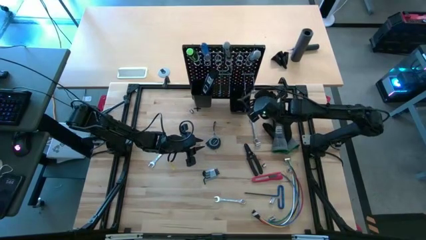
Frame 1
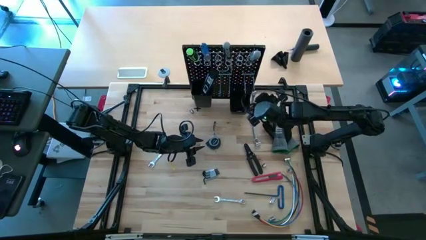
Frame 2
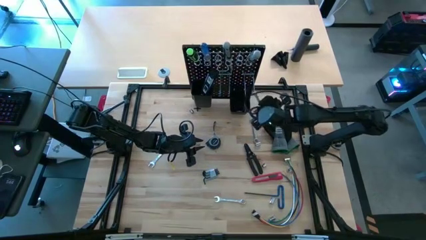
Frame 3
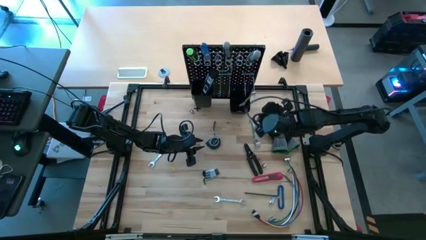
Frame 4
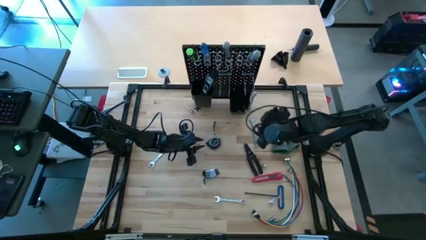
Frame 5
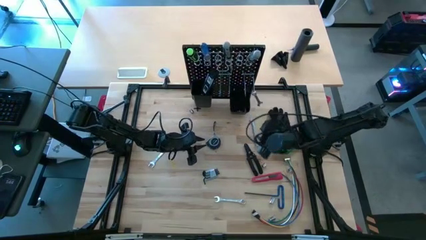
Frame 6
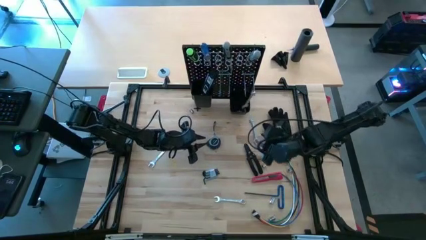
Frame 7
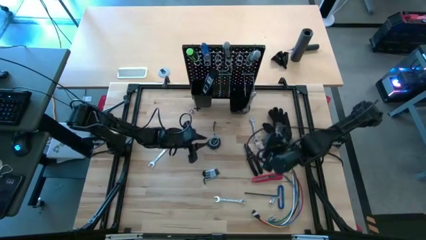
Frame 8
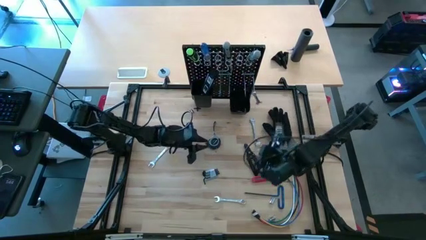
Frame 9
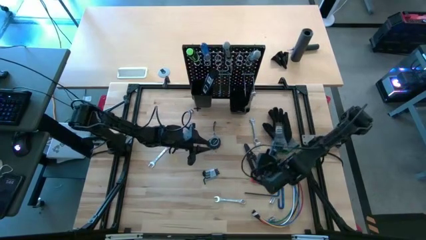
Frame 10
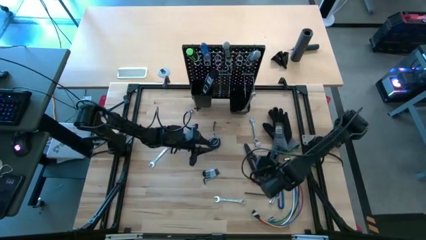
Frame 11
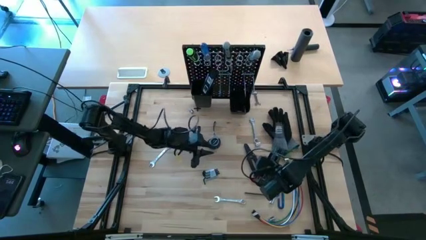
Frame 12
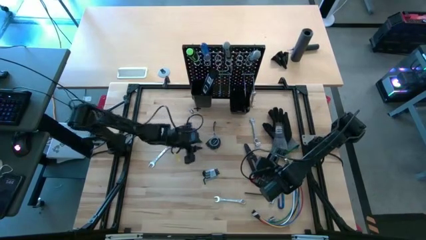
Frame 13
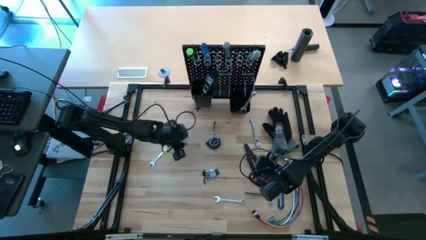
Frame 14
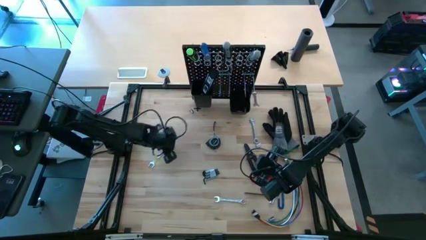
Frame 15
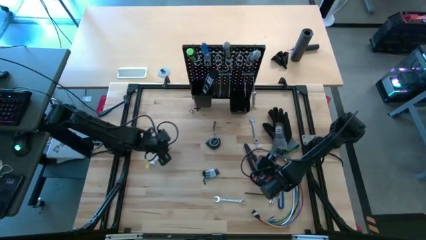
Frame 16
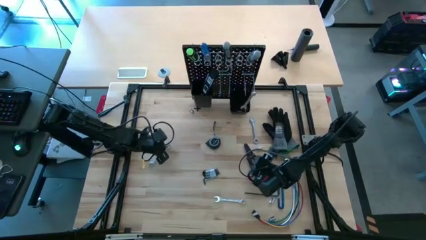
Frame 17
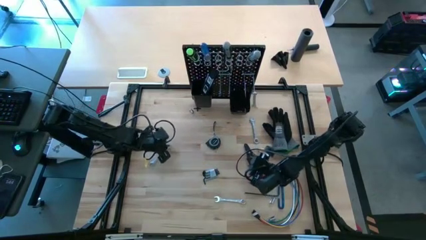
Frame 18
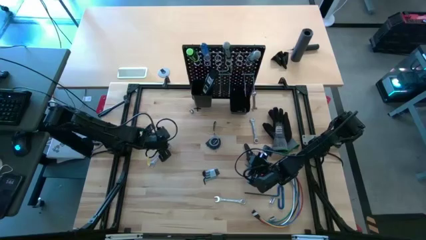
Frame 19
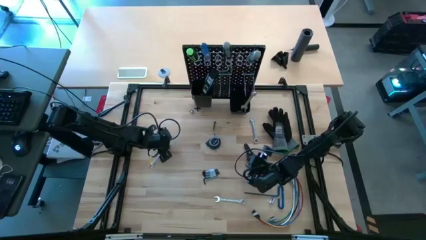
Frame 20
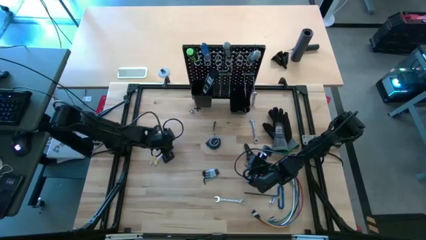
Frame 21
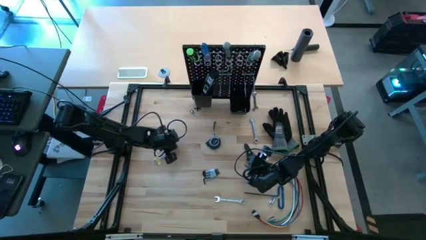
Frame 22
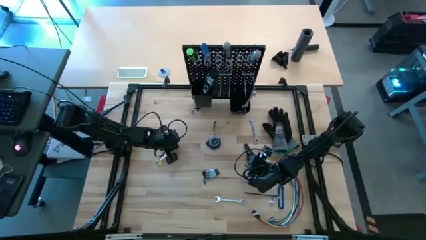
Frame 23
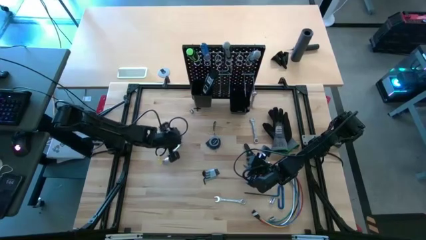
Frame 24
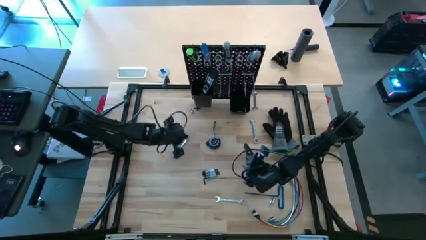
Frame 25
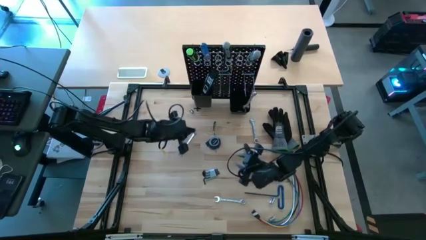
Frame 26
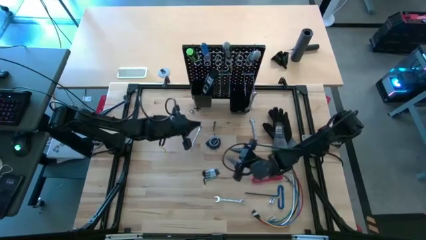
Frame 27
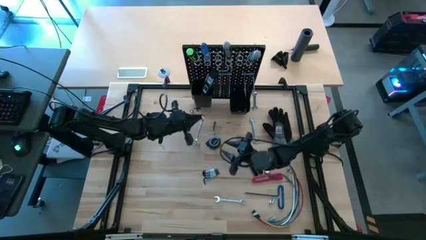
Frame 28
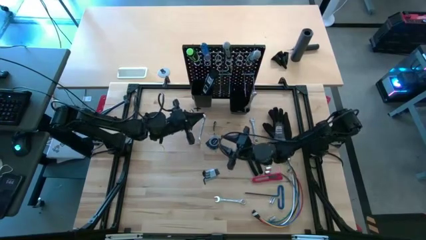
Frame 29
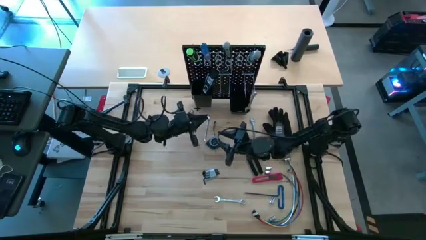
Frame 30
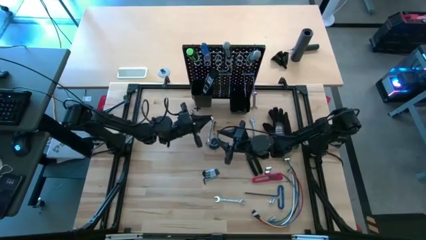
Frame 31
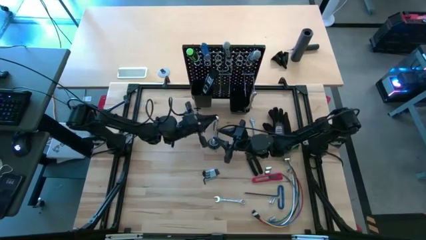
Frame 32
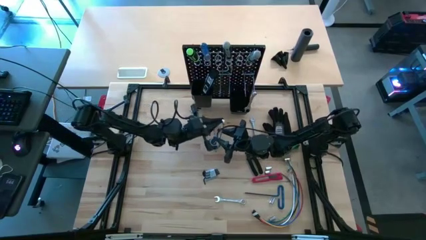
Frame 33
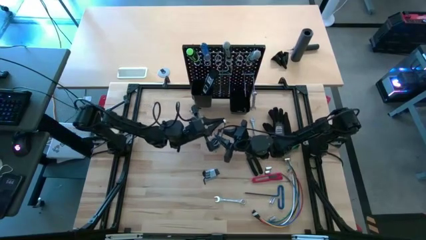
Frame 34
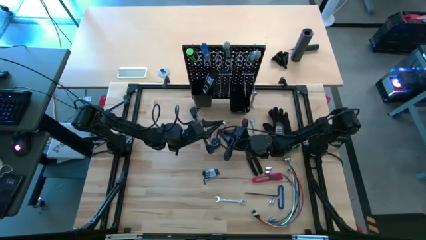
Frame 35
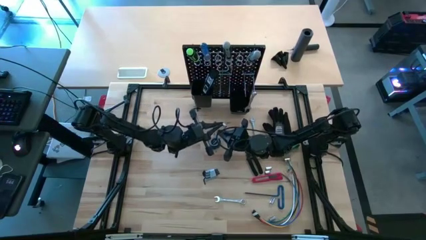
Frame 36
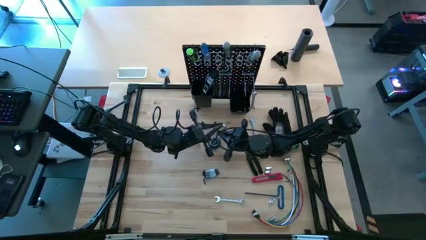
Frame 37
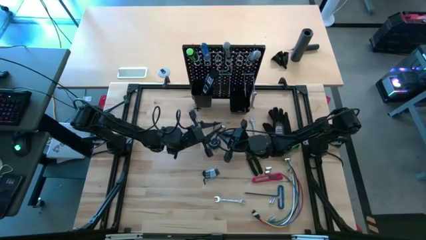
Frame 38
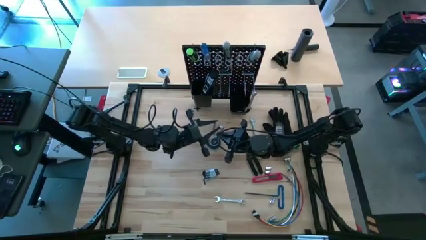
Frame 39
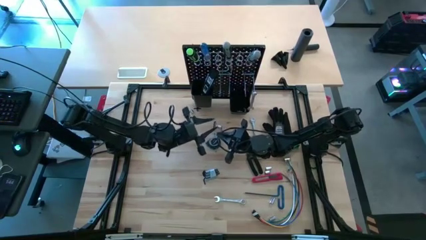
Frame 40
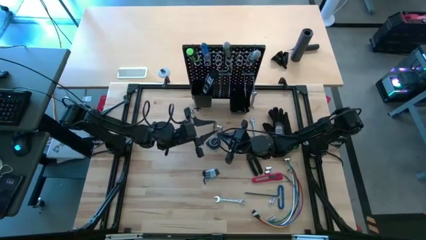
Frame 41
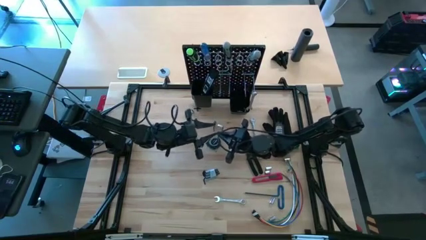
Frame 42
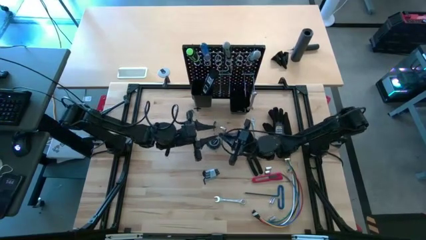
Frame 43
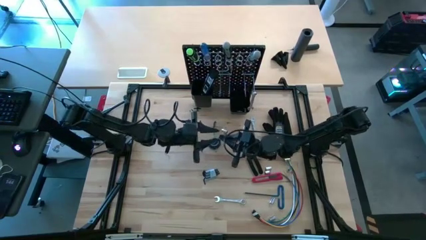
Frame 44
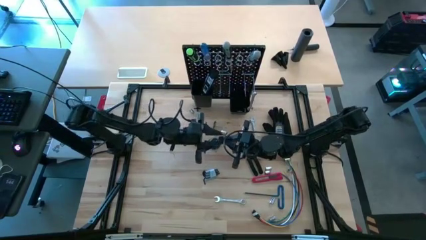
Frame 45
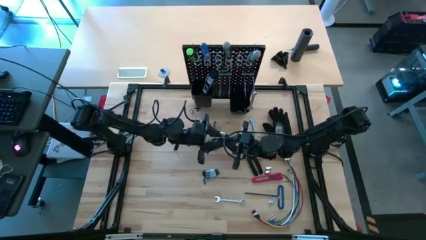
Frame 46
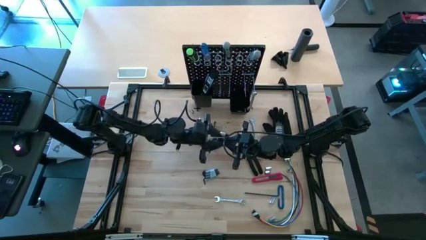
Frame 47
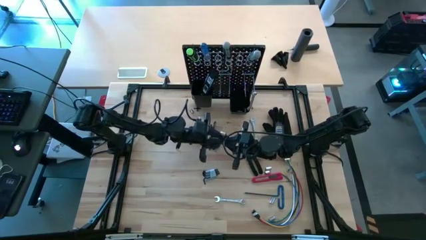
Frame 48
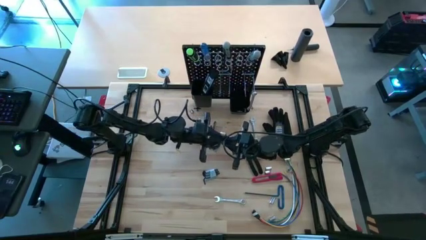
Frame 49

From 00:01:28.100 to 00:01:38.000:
Task: Hang tools onto peg board
Hang the silver wrench on the peg board
